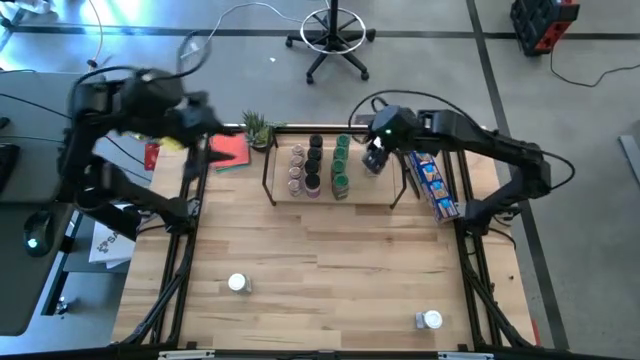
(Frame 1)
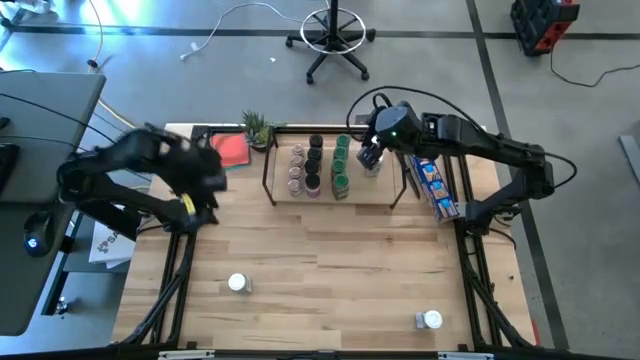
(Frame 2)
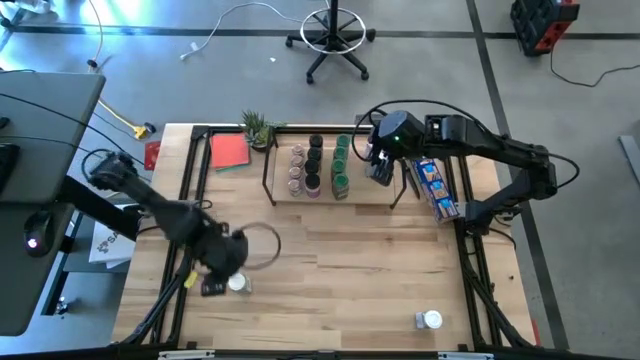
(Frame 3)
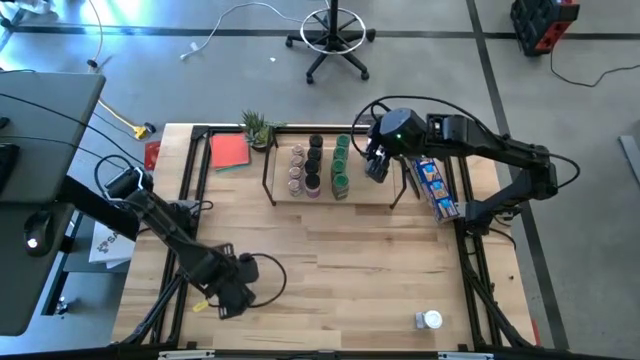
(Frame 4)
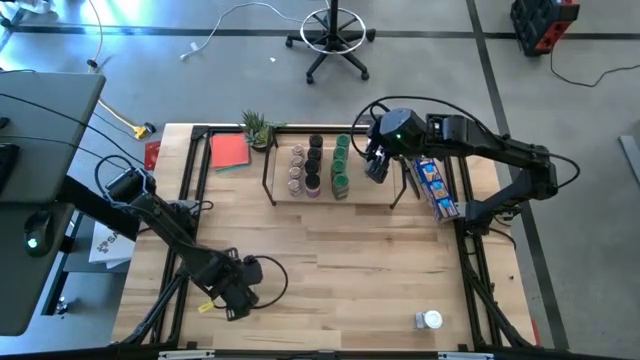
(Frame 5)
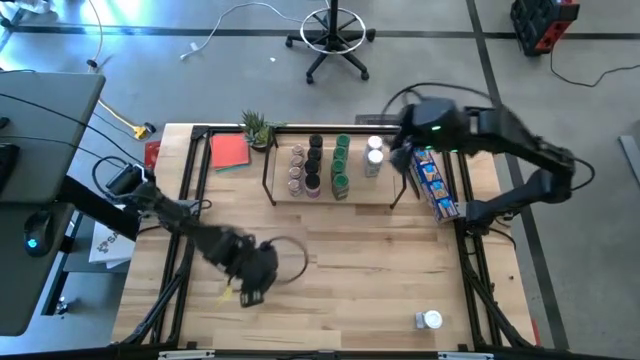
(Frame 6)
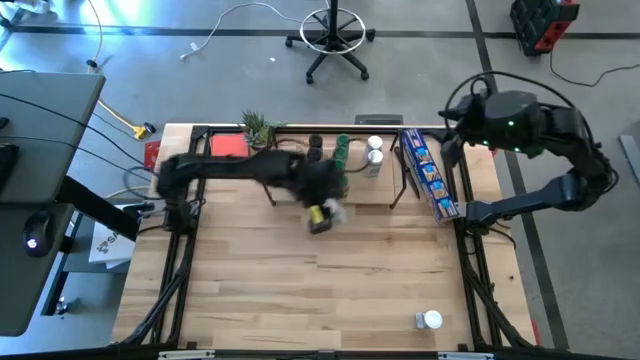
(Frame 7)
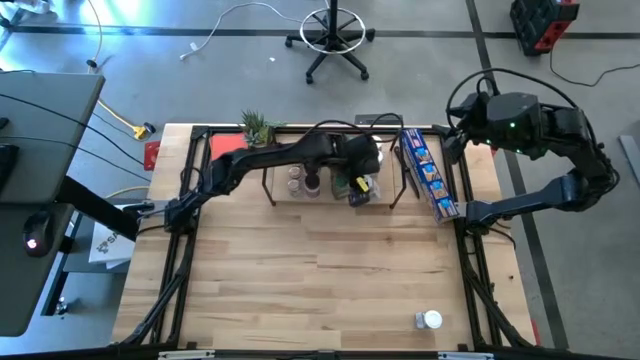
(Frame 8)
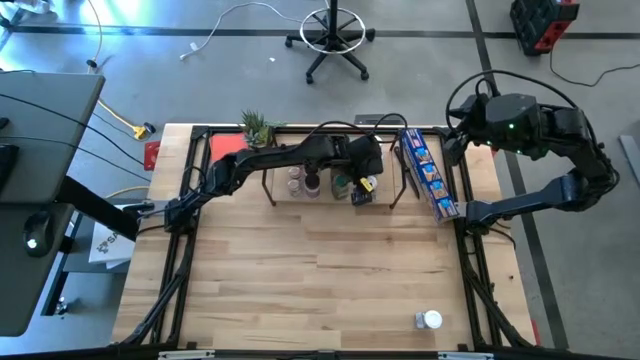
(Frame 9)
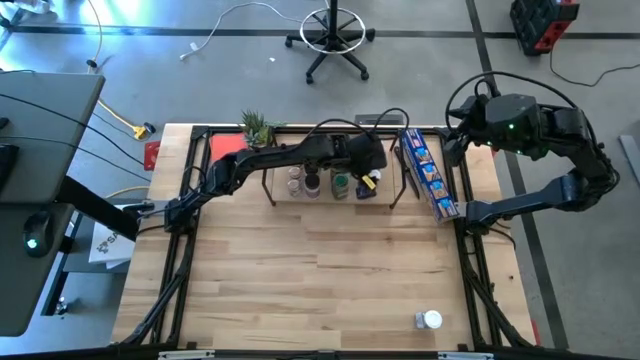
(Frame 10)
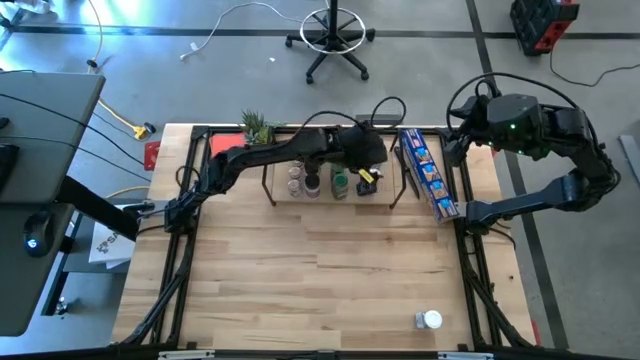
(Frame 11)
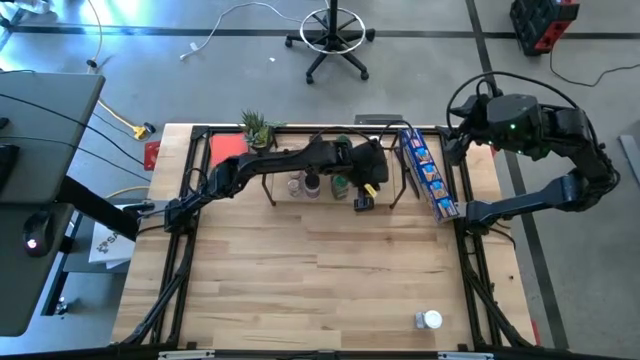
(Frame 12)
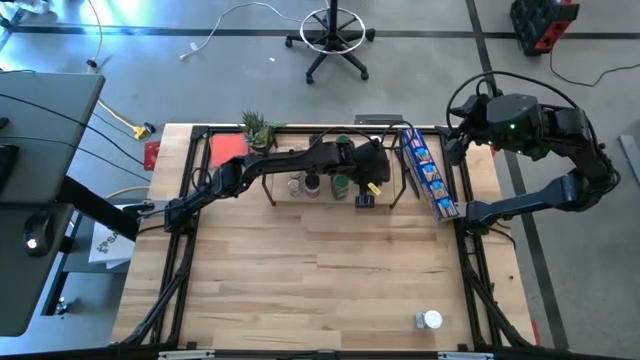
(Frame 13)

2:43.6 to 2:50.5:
Task: Shelf spices
Put the white seasoning bottle aligned with the other green seasoning bottles on the shelf

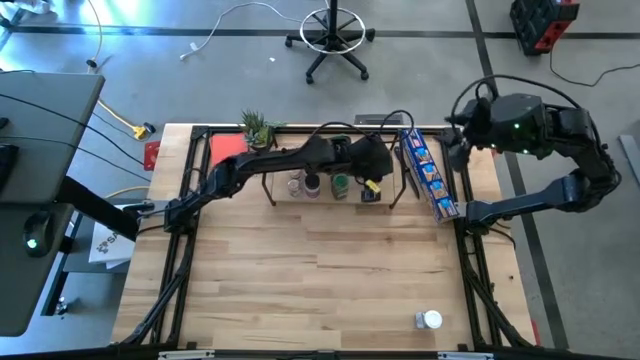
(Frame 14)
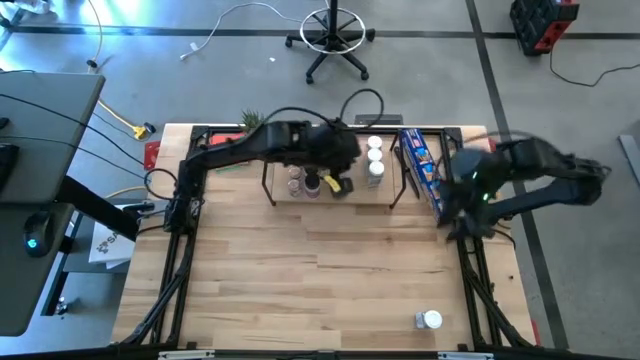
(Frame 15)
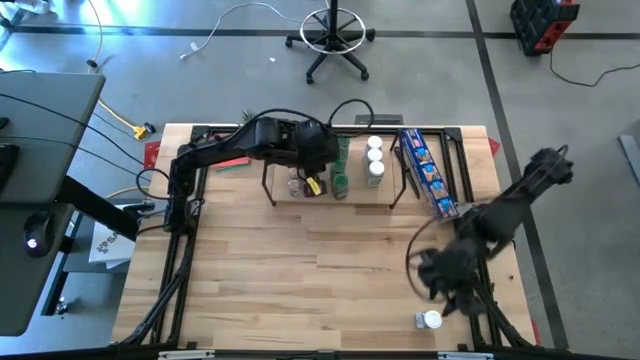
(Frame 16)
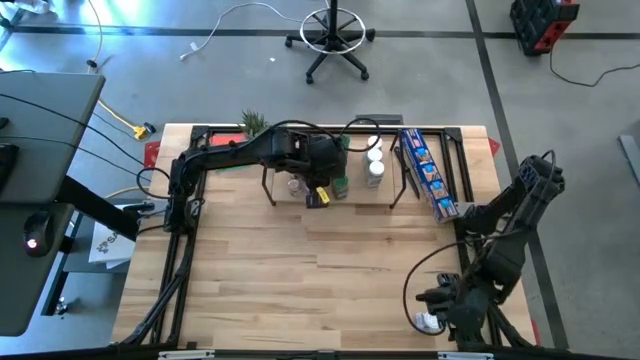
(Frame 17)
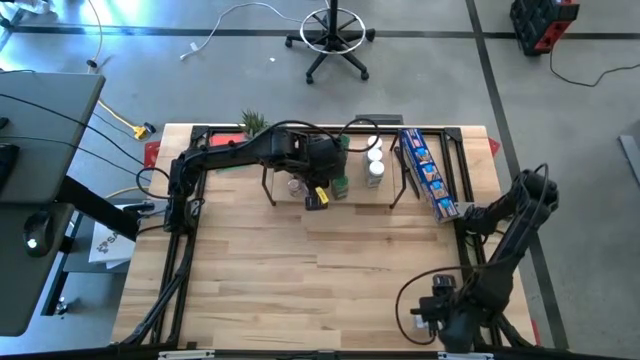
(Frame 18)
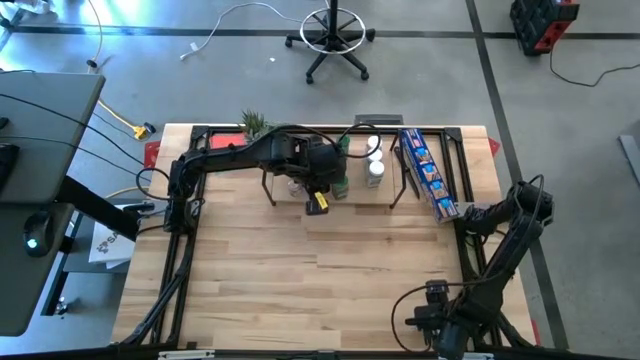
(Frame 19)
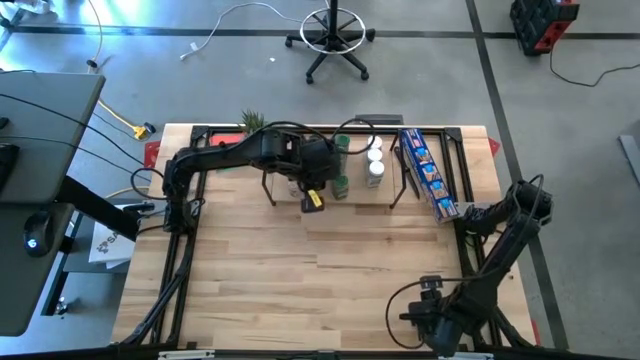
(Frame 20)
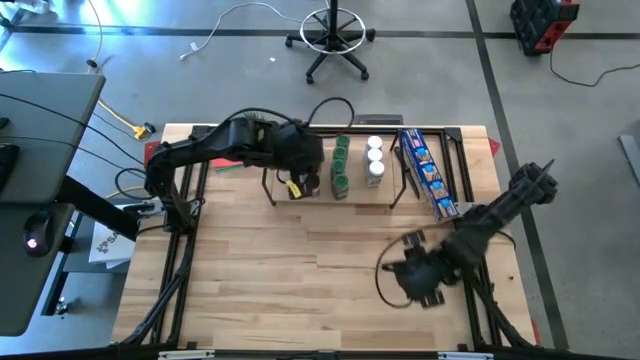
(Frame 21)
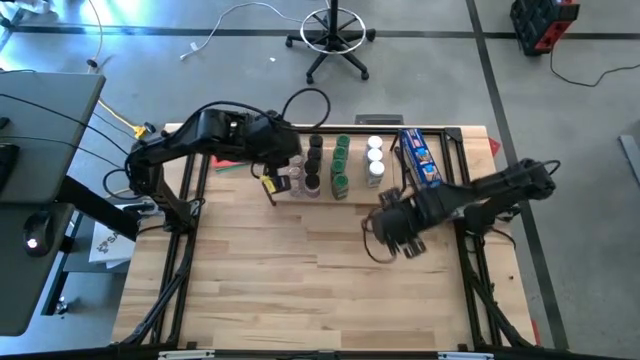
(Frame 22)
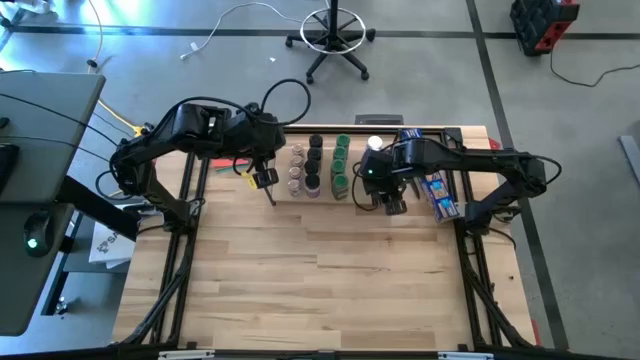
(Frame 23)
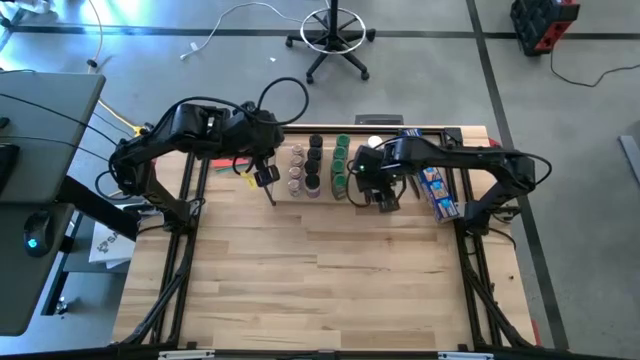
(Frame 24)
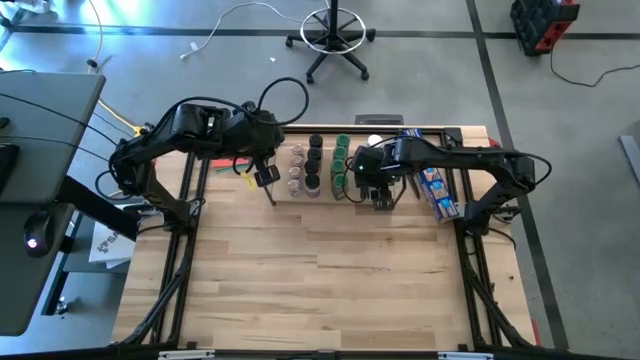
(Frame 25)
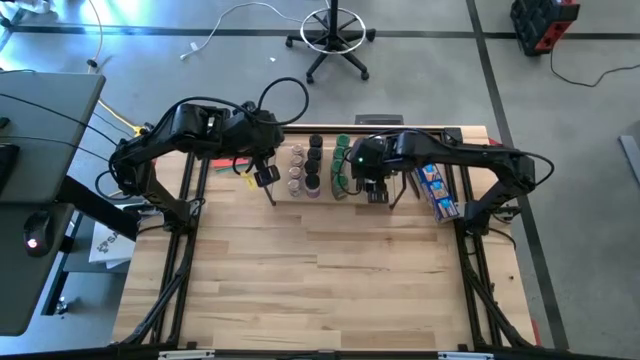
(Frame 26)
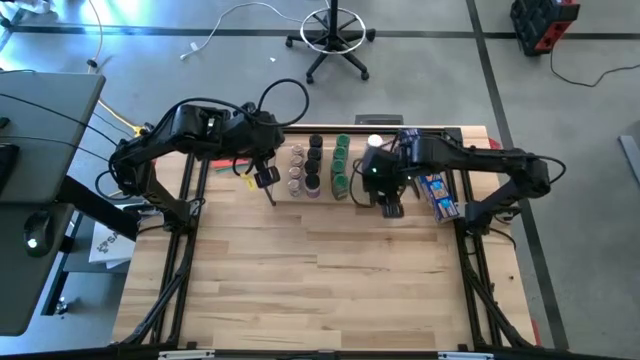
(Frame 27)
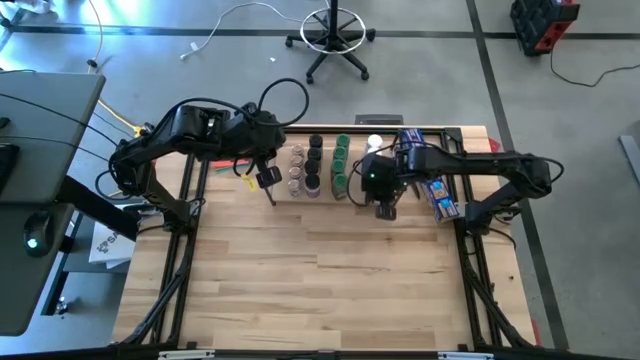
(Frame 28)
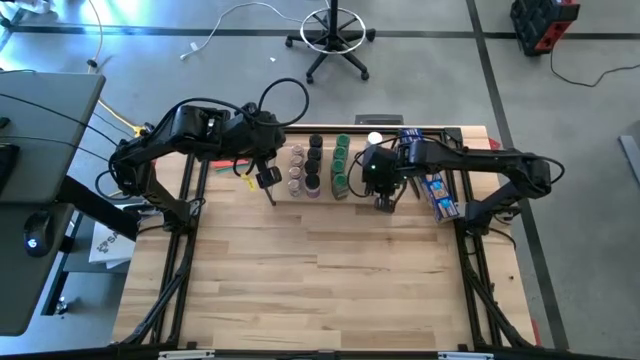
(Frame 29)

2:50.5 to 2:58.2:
Put the white seasoning bottle aligned with the other green seasoning bottles on the shelf

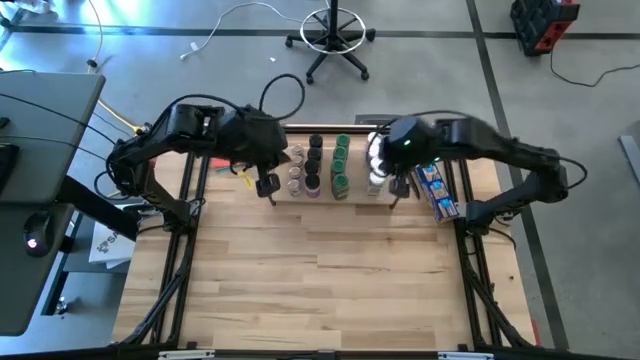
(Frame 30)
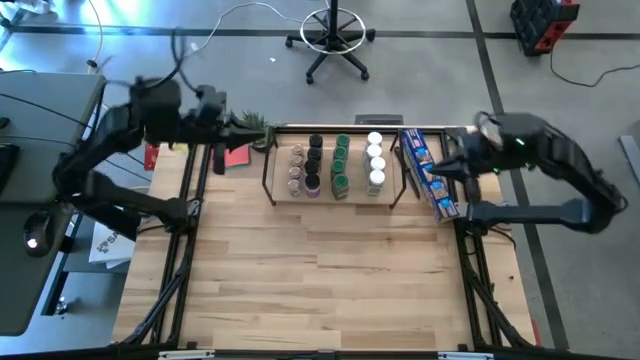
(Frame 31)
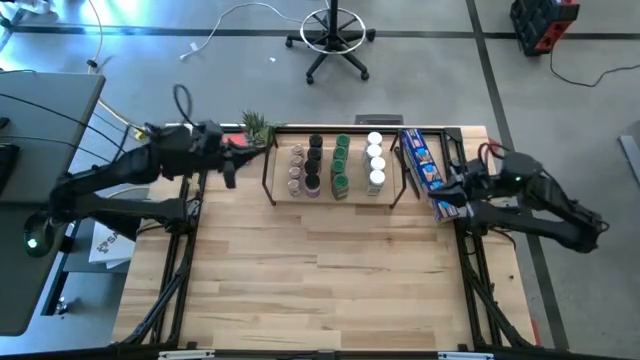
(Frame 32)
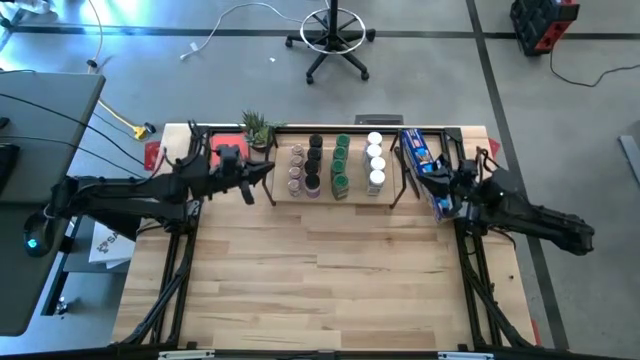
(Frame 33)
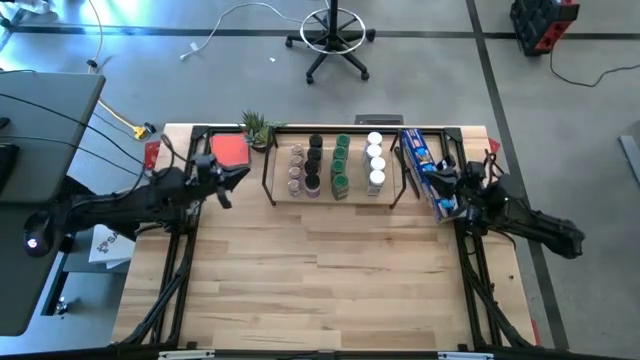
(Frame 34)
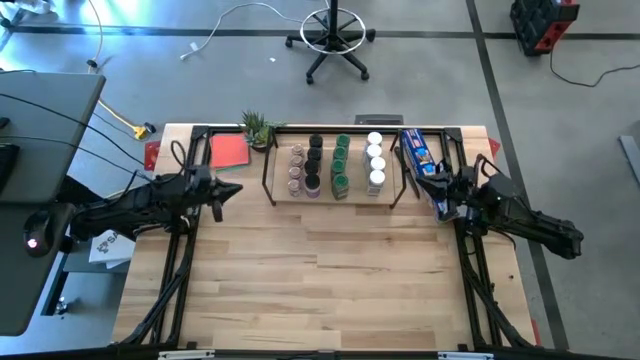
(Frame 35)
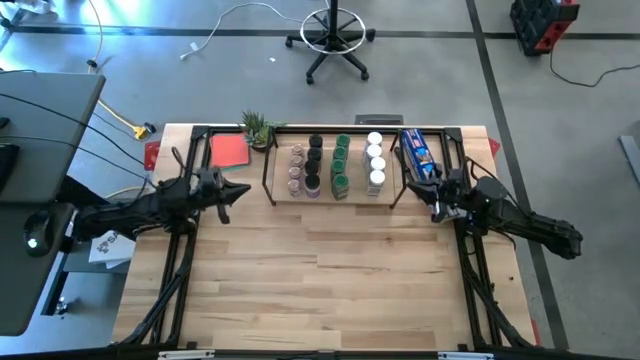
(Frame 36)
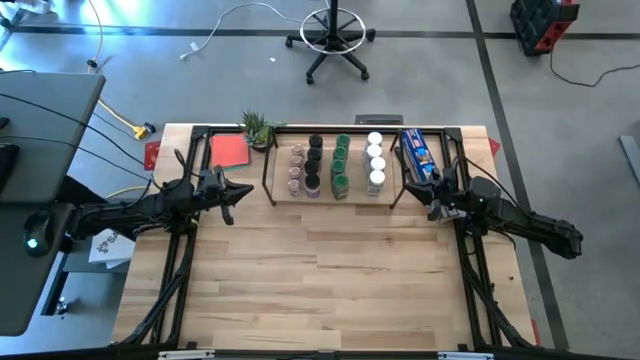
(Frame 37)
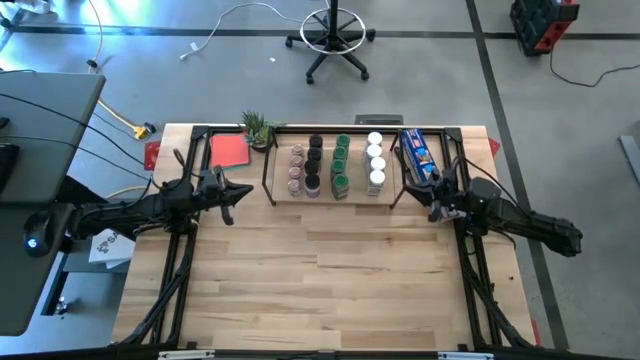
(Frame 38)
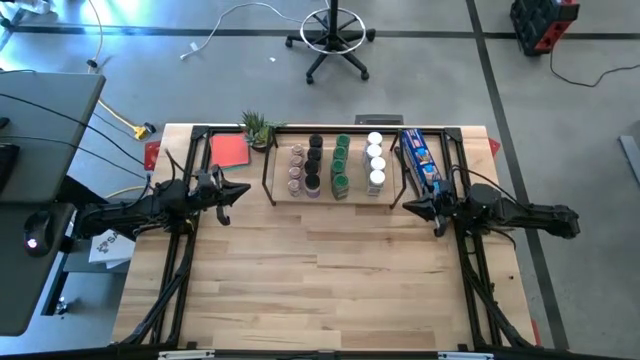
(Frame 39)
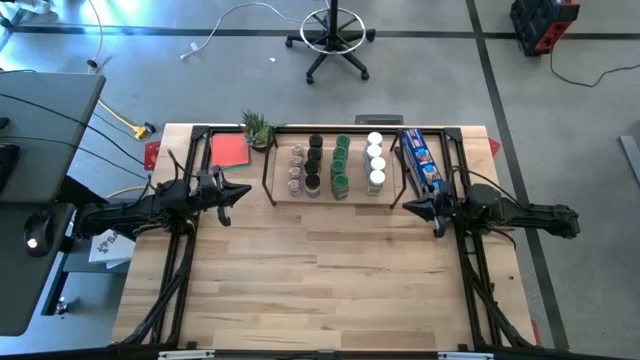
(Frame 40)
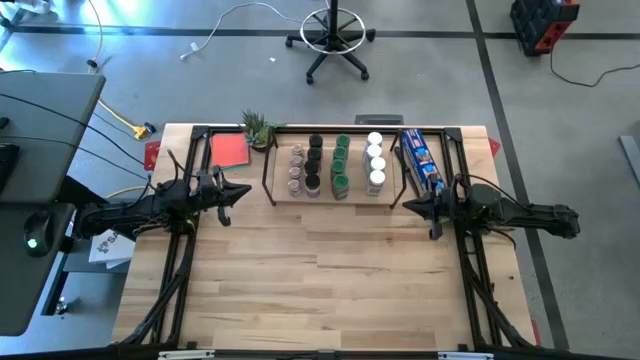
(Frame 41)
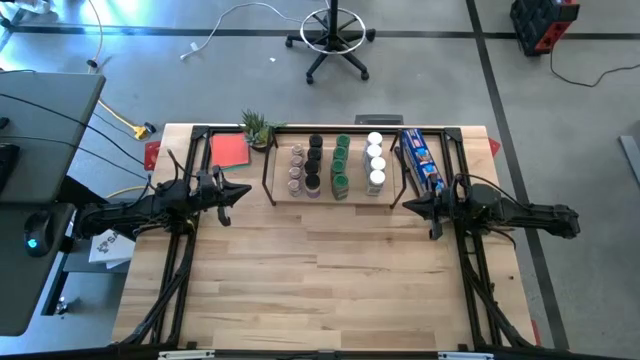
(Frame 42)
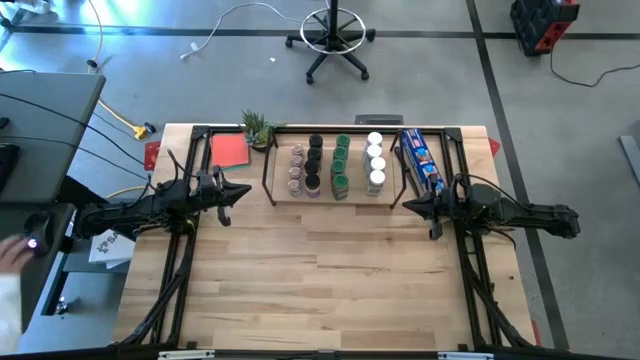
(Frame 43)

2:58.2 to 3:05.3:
Return to Home Position
